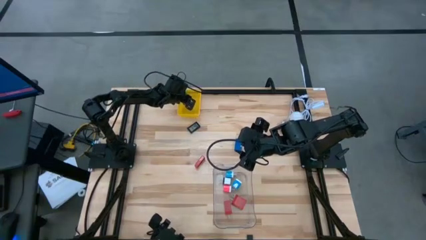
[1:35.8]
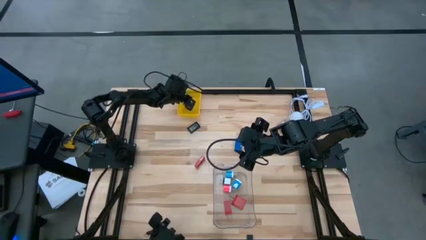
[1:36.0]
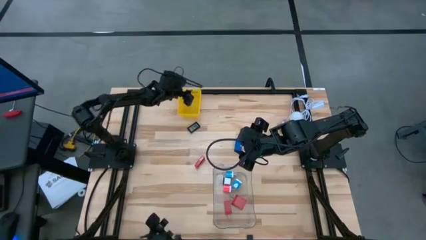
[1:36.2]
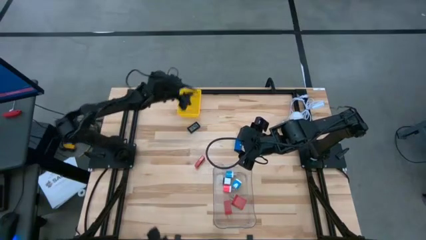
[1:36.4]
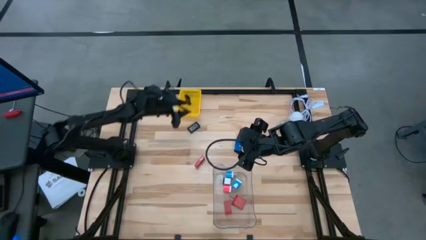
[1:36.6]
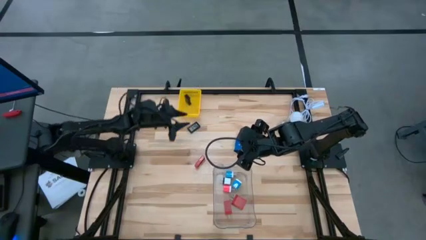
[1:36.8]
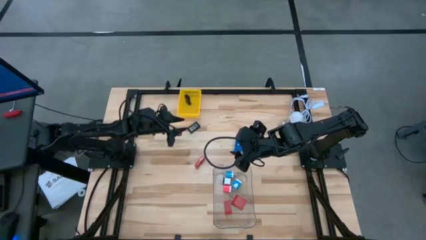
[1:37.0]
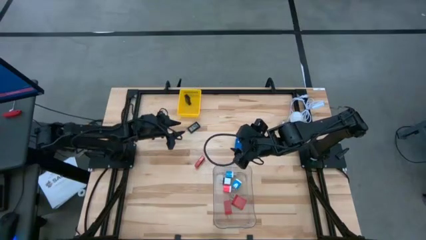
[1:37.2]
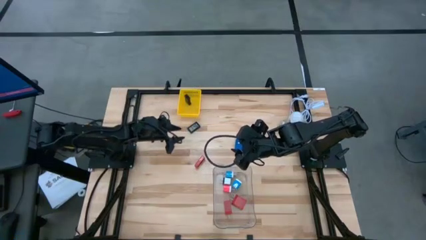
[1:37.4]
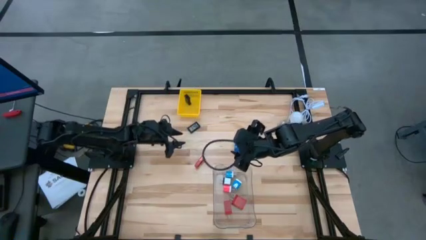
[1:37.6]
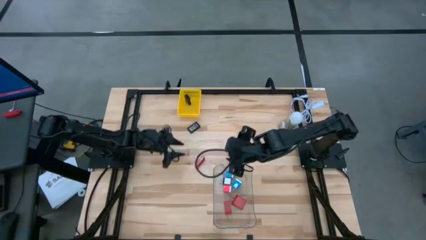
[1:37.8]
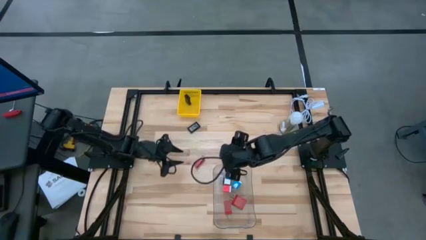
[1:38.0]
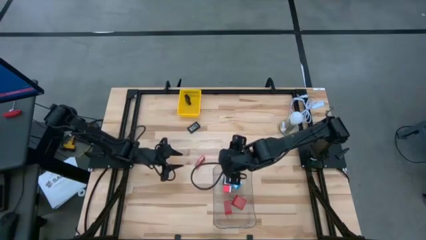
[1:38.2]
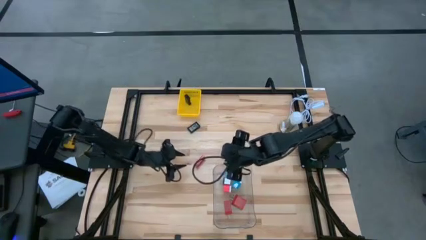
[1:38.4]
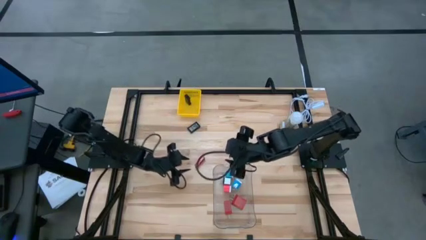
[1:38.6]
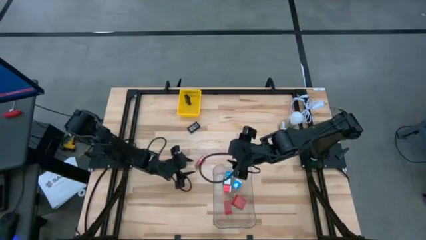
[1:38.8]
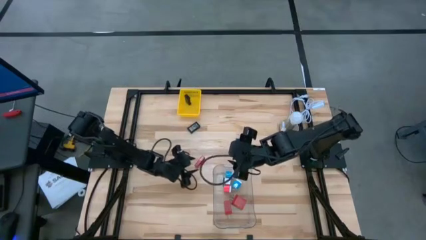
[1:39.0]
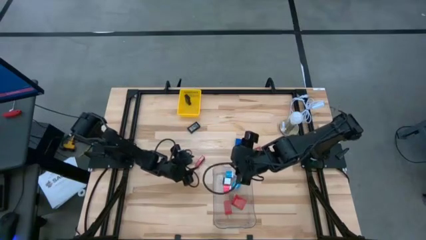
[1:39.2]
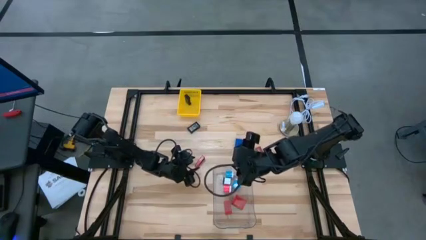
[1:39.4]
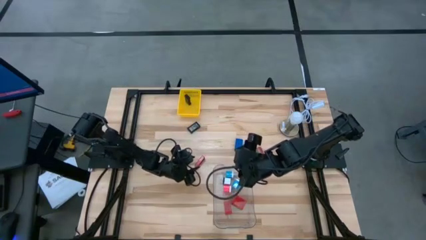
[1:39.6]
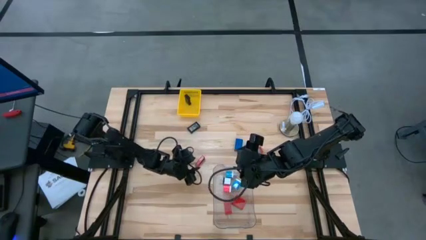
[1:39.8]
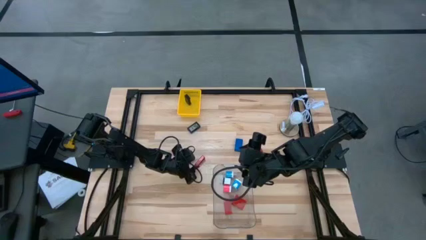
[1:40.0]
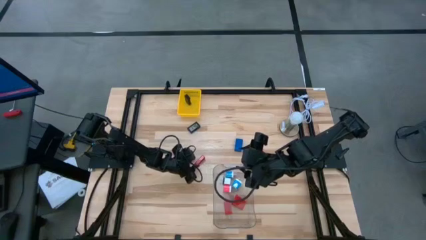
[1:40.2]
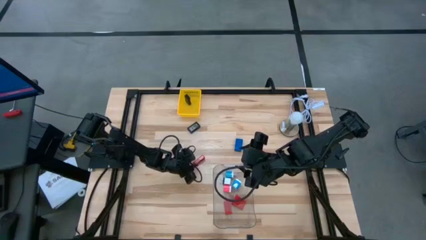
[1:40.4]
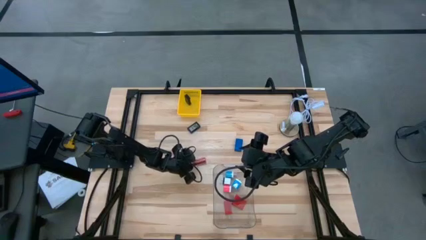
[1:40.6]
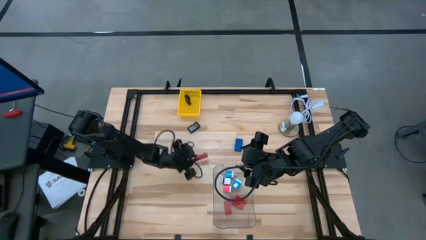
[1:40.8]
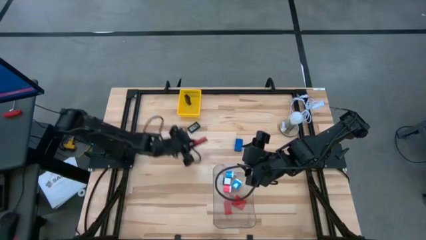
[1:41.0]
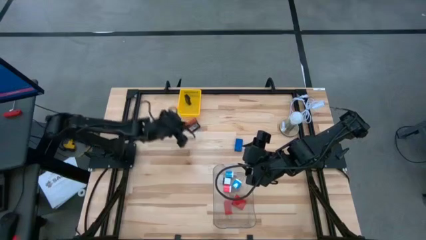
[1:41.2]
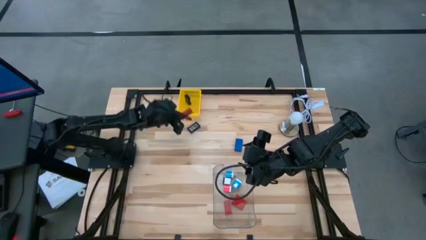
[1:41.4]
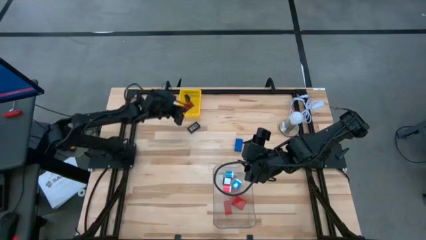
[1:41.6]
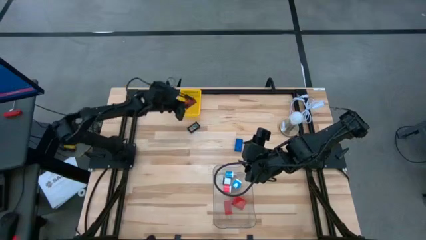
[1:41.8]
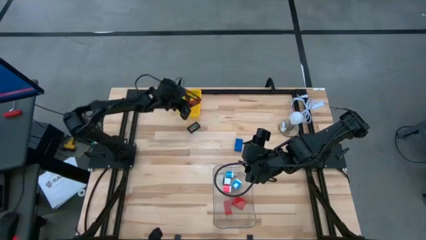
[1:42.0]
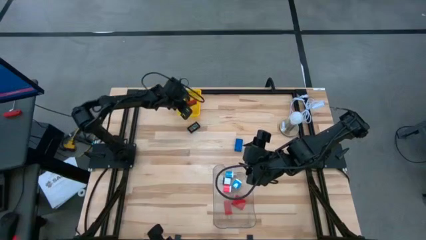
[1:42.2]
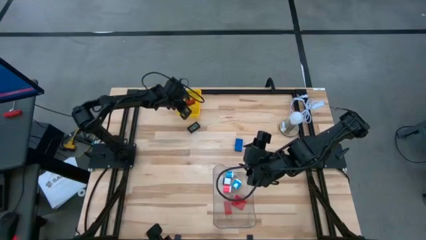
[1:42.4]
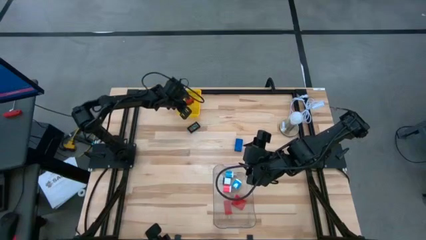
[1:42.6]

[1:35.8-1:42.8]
Task: Pick & Place Office items
Put the left red digital clock into the yellow bin

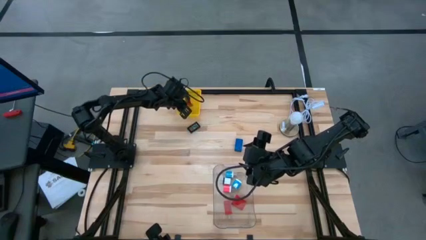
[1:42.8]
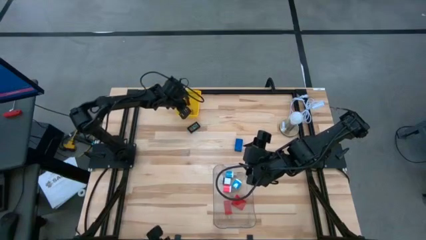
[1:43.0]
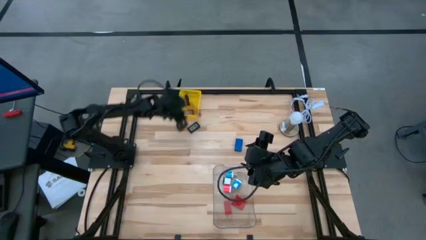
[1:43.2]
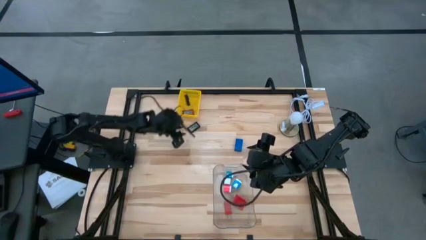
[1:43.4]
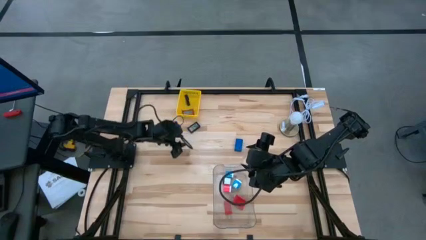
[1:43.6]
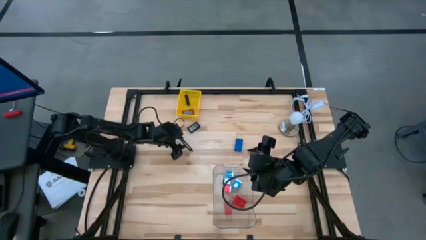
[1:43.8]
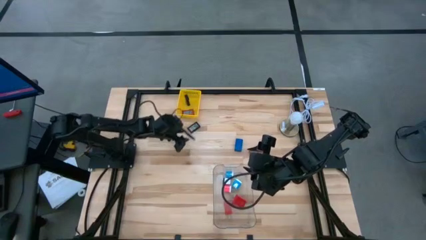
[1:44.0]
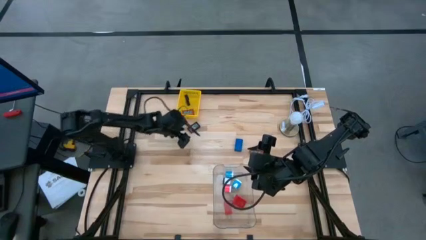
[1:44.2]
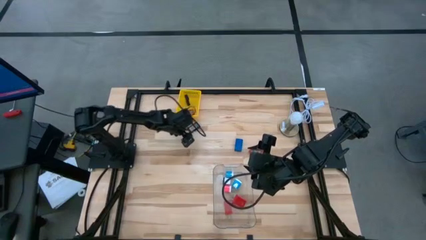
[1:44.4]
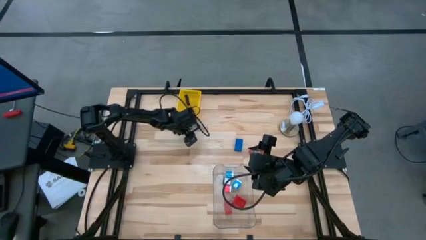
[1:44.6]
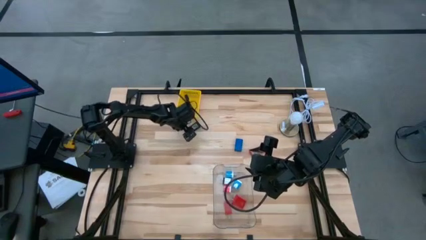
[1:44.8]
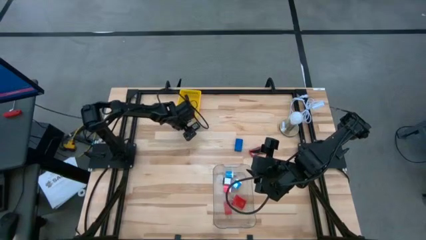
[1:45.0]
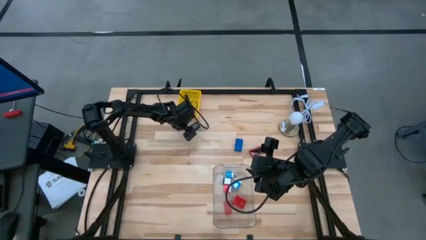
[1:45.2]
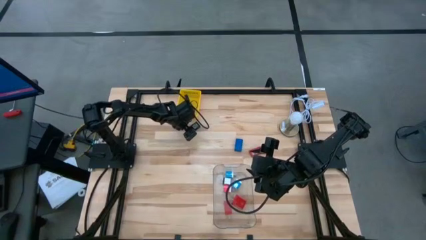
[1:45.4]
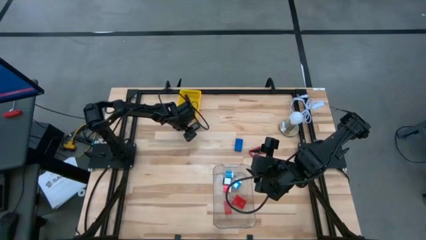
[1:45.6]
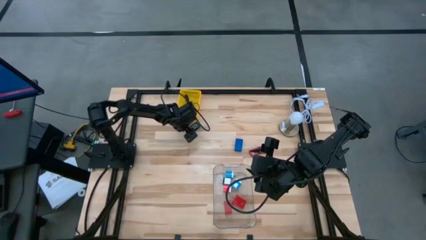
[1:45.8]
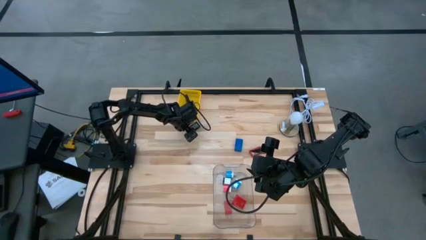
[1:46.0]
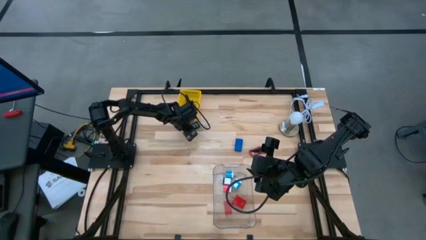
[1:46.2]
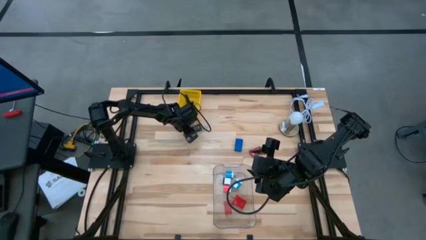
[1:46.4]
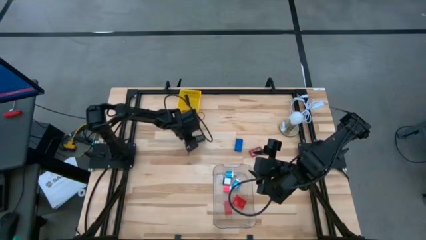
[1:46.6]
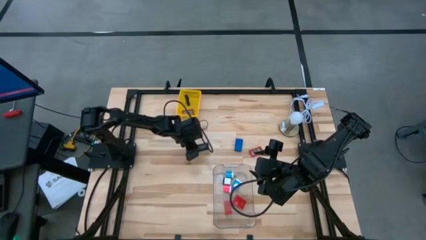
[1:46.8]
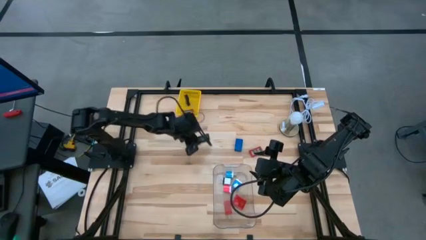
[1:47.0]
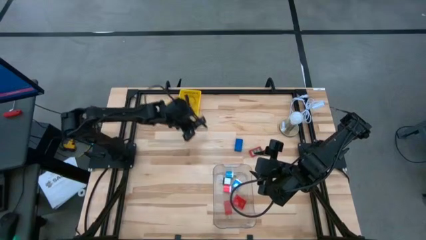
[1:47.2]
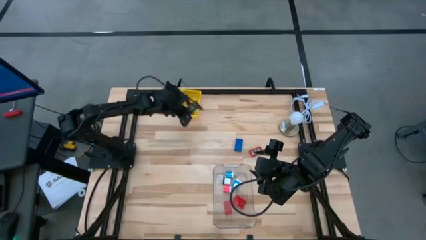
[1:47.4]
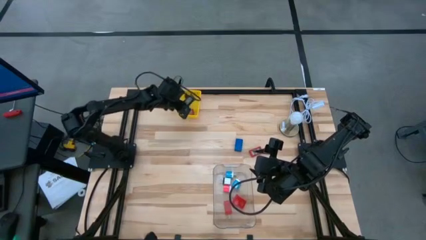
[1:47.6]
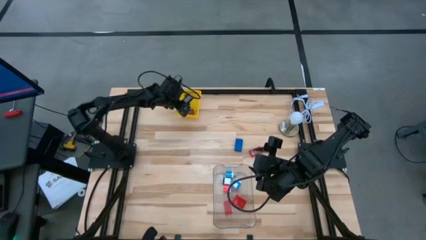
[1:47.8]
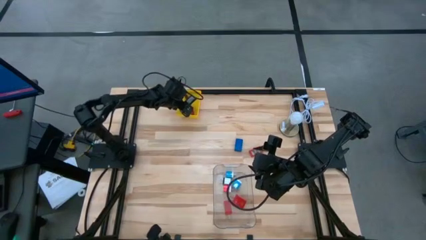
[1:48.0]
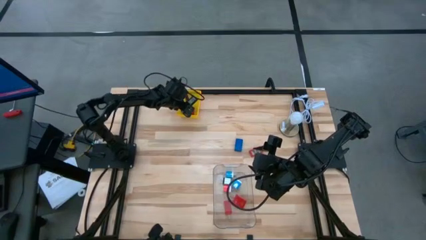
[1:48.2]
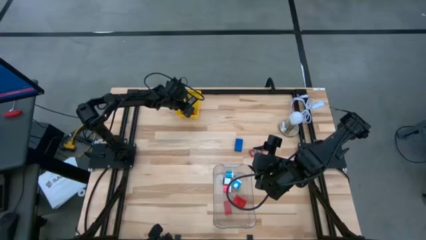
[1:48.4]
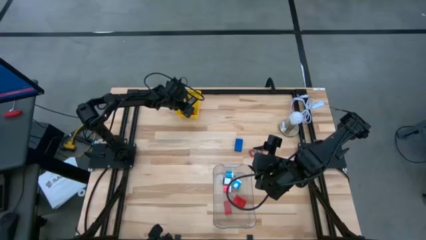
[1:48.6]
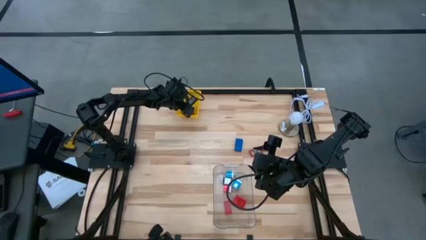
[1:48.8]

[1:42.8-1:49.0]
Put the black digital clock into the yellow bin
